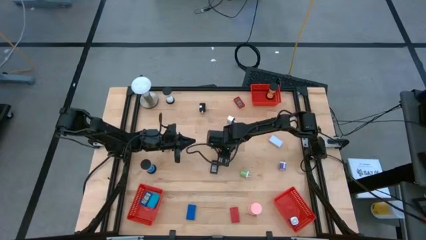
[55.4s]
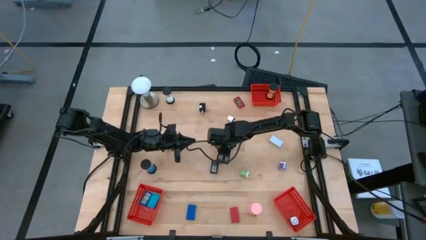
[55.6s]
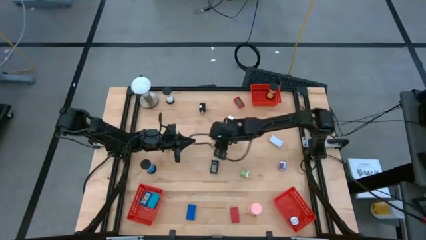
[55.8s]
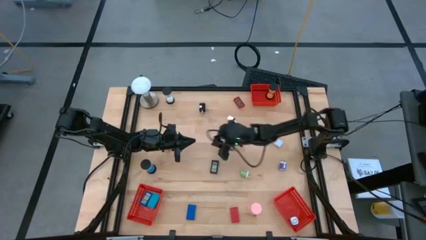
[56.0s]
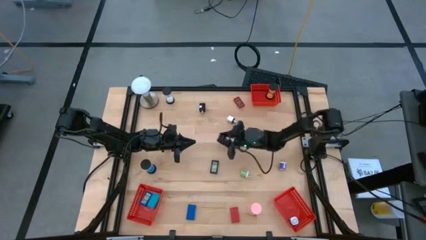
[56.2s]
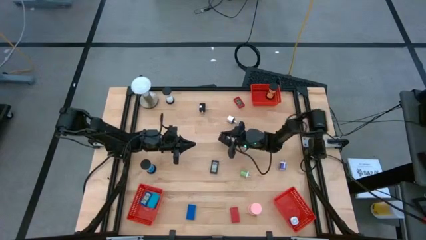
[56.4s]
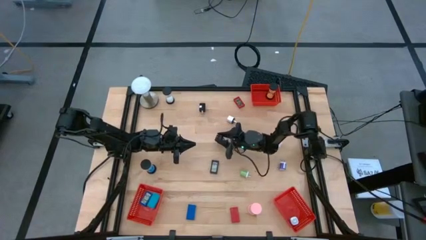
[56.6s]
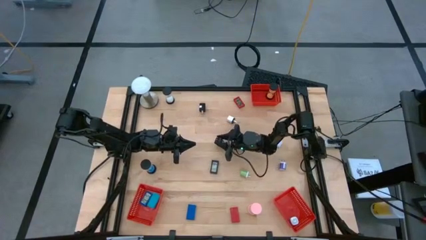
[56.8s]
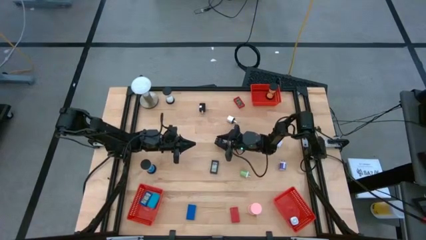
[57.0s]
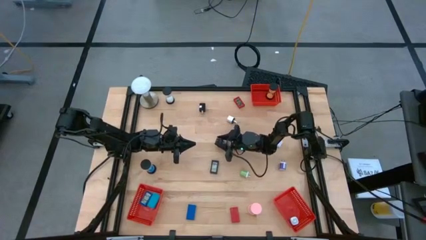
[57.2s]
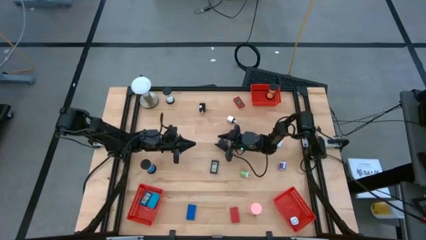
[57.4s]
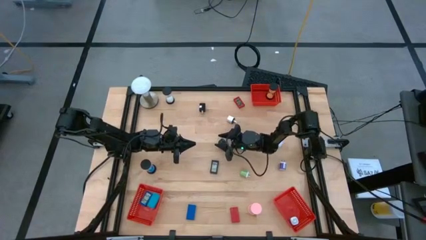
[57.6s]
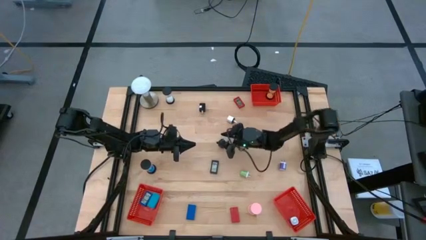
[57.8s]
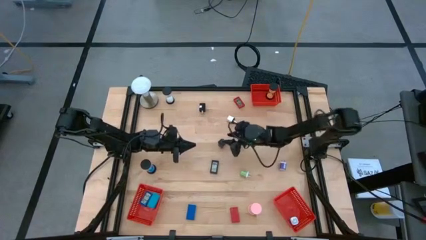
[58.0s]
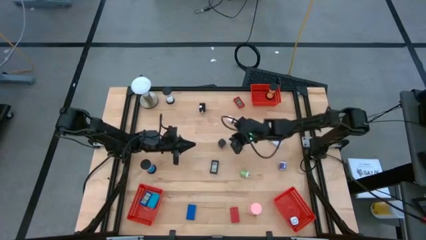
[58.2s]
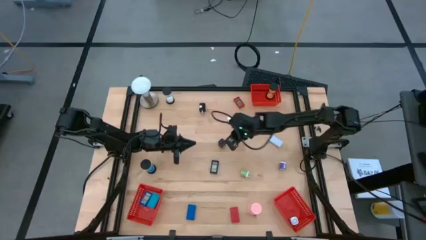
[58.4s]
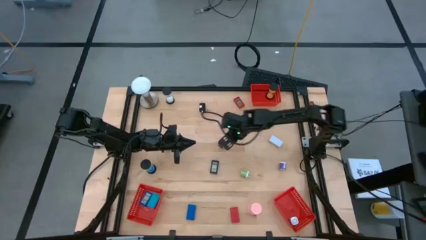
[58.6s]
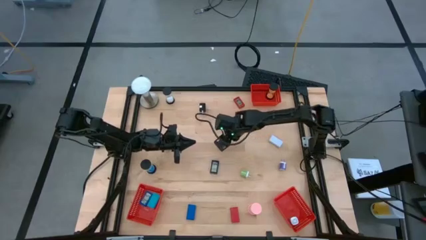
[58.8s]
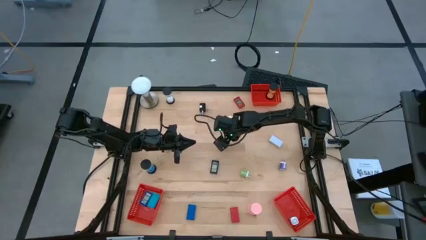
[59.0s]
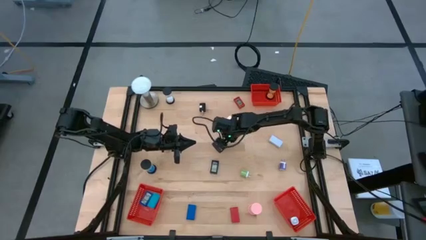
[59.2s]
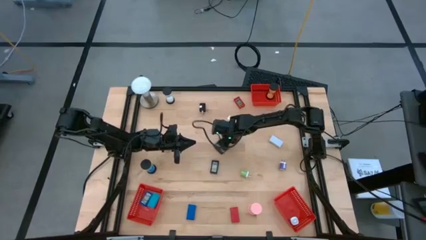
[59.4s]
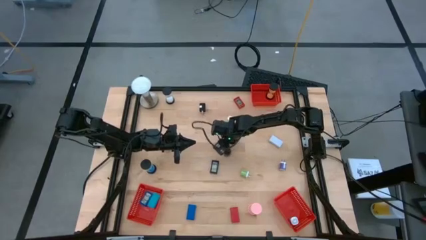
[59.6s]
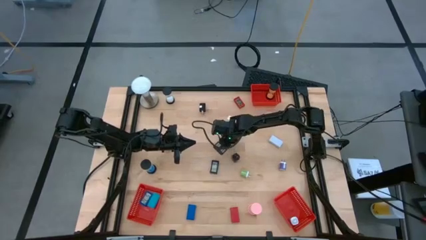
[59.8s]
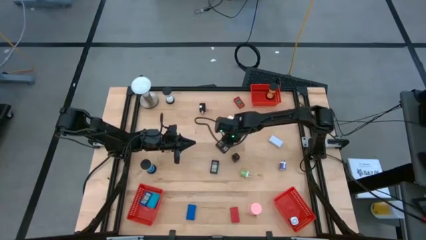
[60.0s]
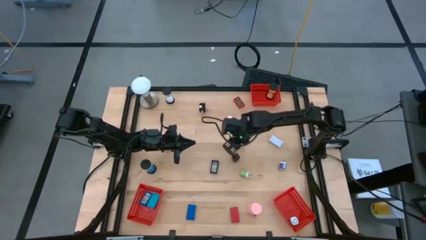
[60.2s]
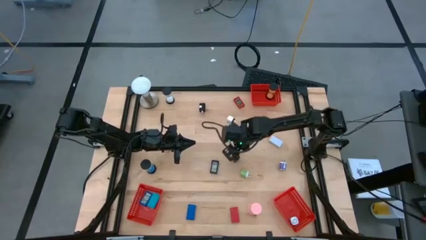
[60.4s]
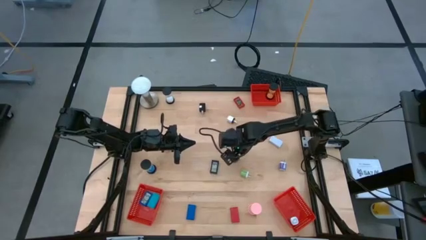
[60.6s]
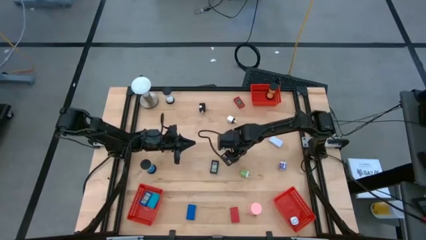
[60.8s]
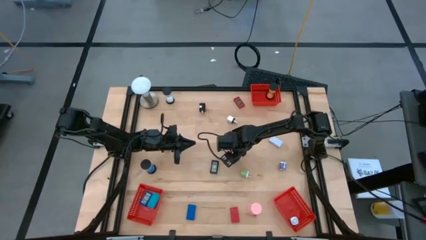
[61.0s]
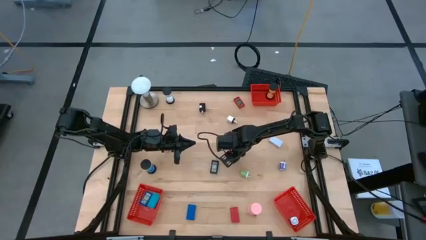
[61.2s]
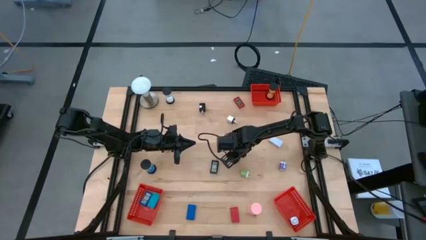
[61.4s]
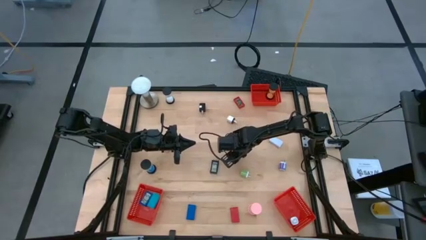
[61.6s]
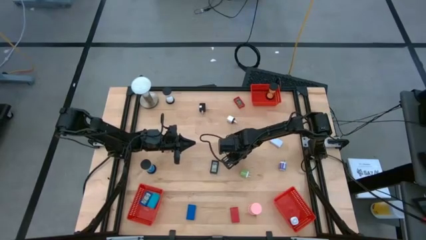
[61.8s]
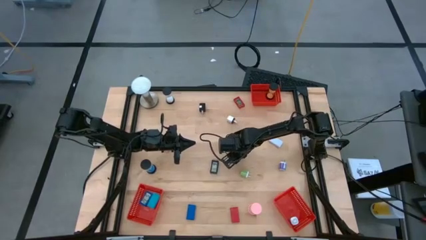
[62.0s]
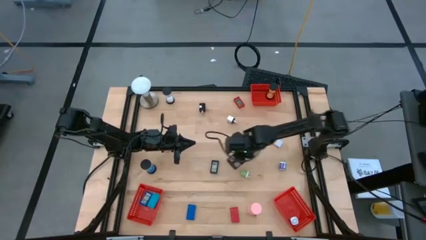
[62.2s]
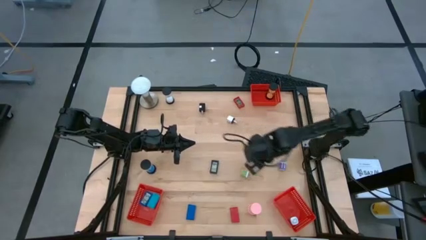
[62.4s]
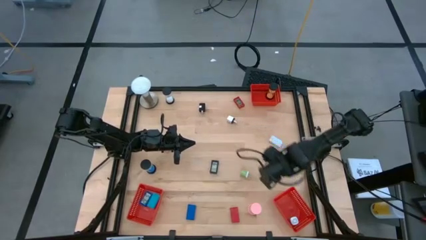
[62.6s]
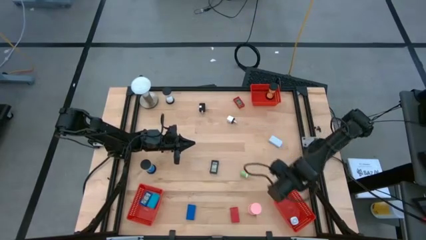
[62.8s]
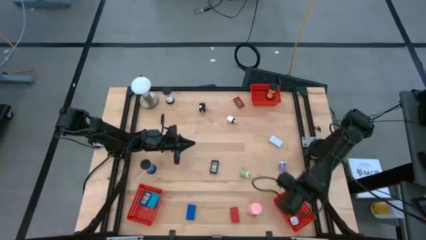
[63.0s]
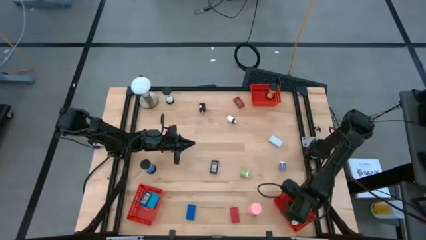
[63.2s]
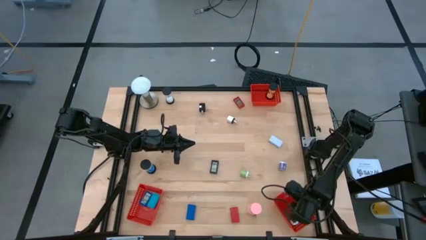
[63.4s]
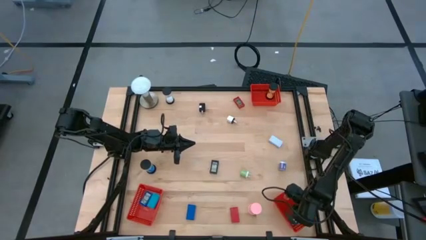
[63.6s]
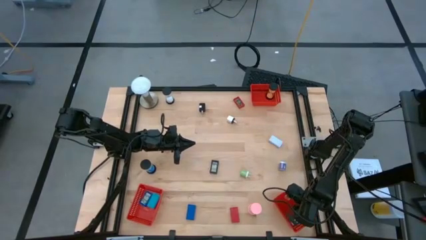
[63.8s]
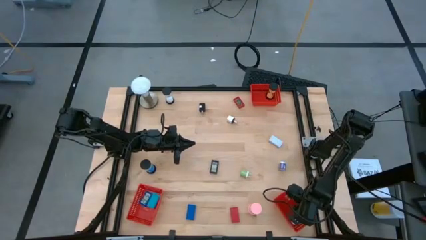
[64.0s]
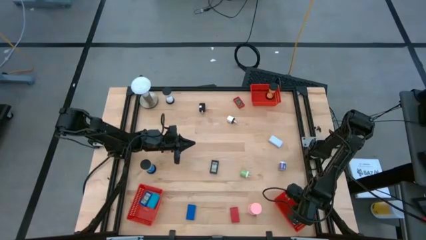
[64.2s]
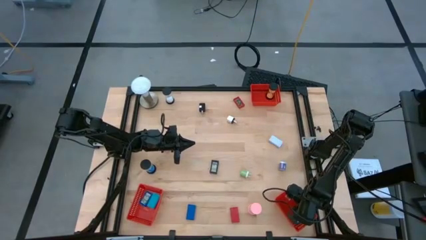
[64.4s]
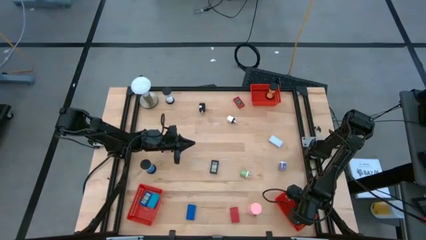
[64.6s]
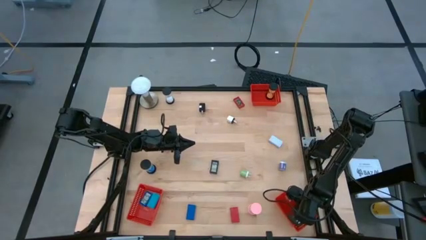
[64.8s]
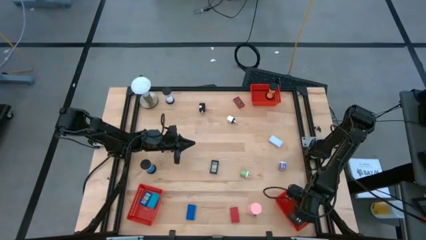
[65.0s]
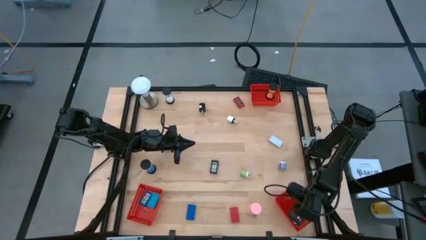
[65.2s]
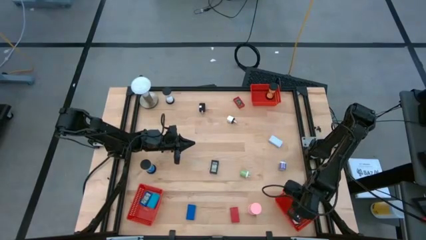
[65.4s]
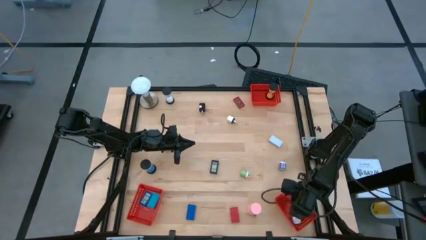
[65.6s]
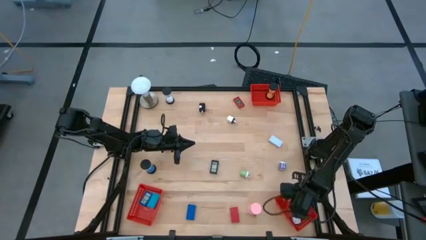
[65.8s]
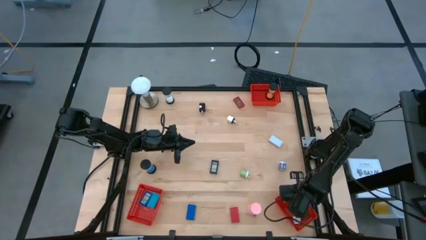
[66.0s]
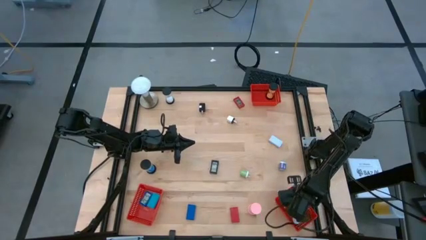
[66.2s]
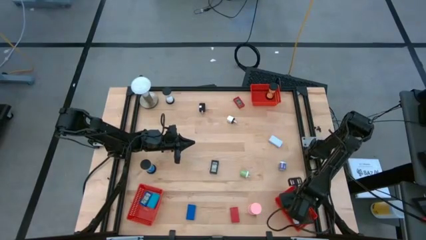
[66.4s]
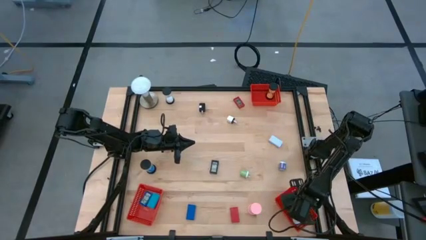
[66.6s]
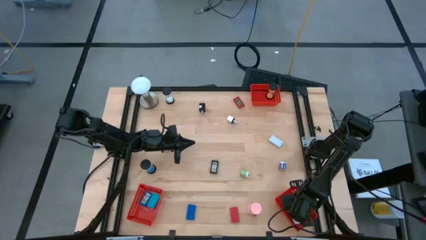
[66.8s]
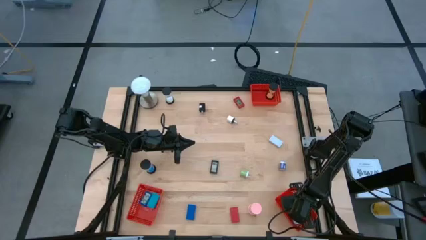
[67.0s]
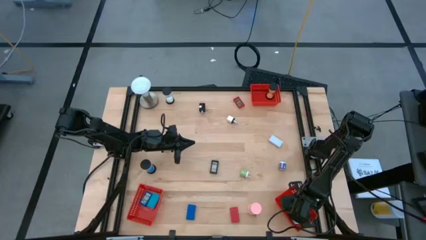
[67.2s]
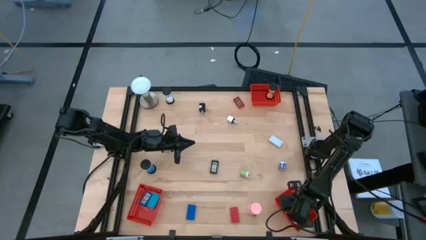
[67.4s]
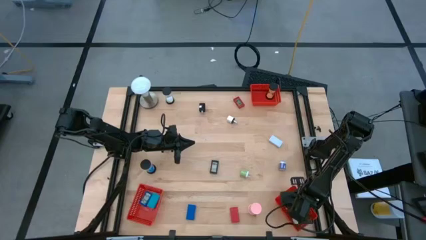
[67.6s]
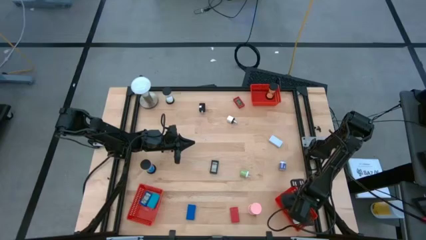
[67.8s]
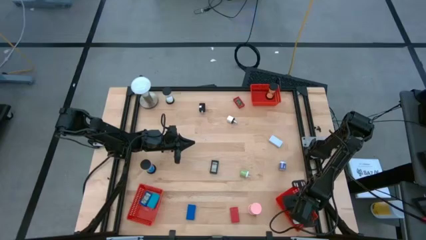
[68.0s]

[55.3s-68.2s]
Task: Pick & Place Office items
Put the bottom black charger adapter into the bottom right red basket

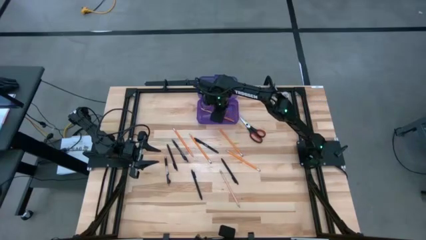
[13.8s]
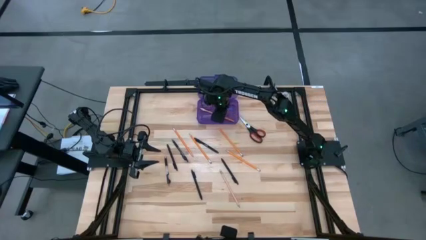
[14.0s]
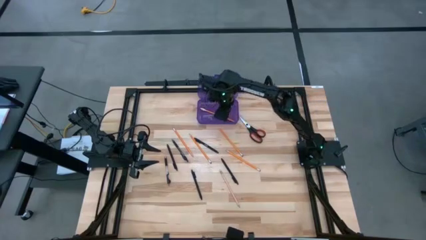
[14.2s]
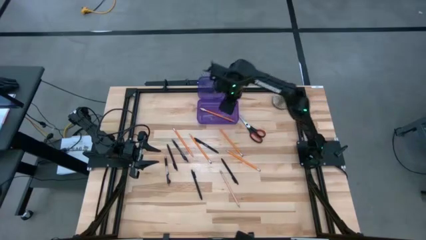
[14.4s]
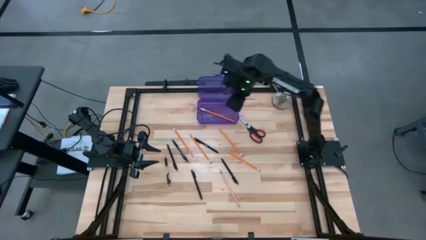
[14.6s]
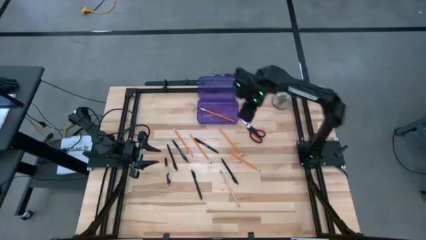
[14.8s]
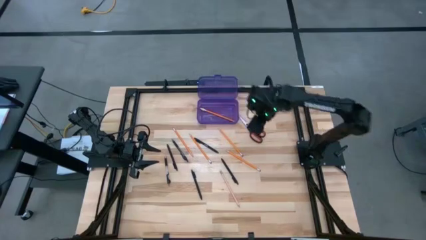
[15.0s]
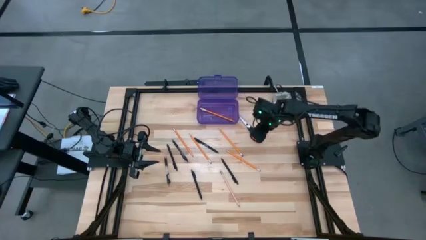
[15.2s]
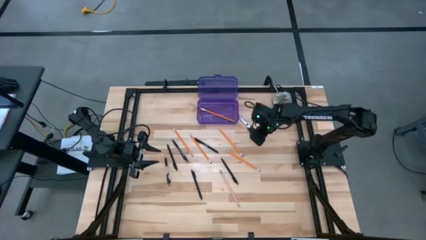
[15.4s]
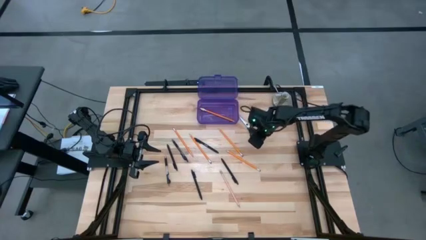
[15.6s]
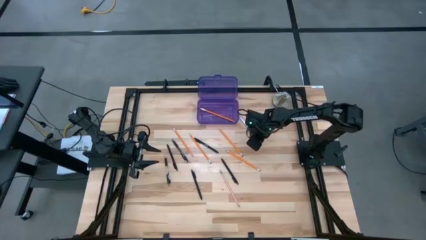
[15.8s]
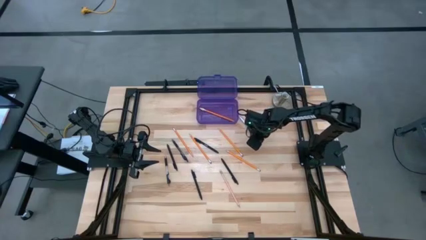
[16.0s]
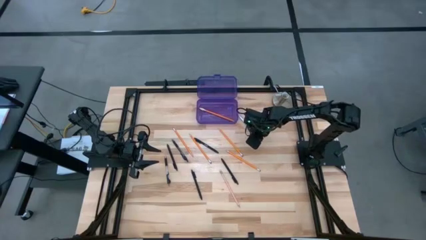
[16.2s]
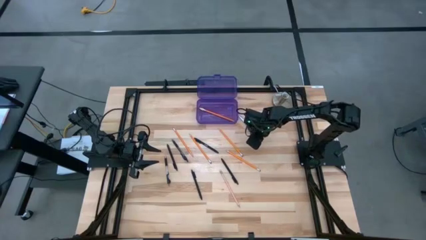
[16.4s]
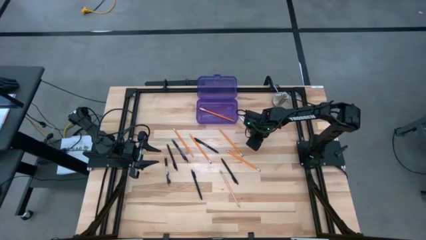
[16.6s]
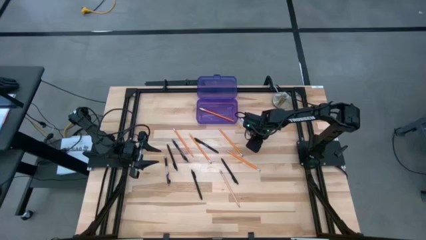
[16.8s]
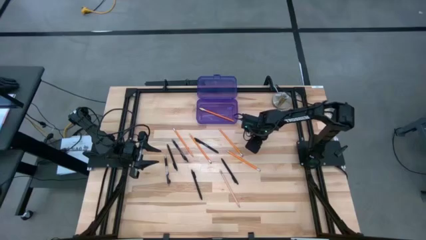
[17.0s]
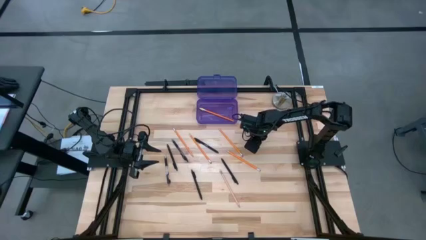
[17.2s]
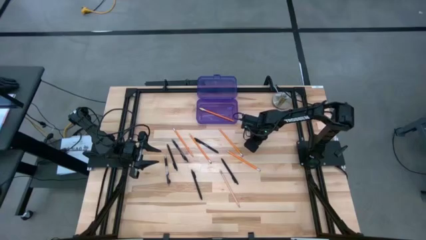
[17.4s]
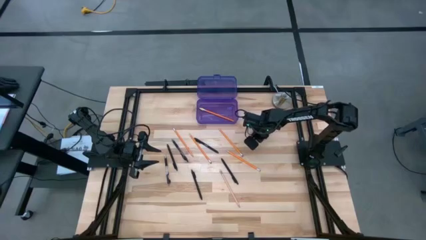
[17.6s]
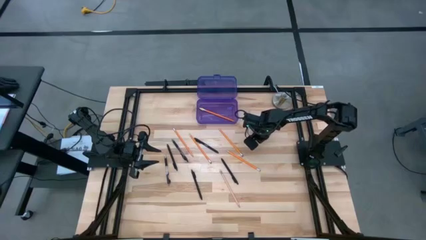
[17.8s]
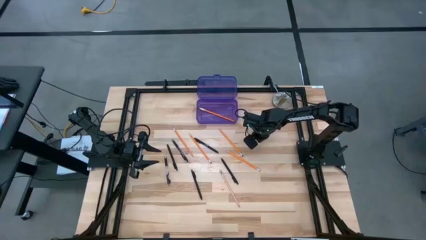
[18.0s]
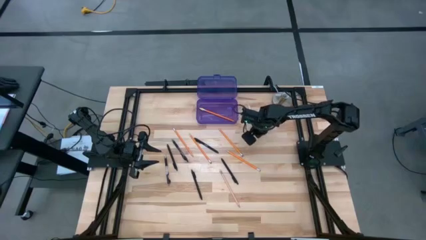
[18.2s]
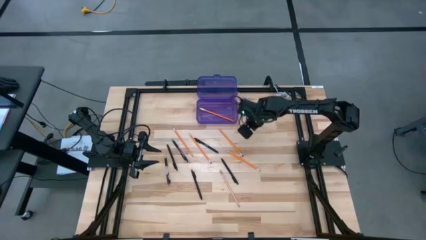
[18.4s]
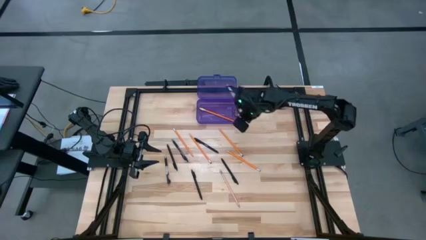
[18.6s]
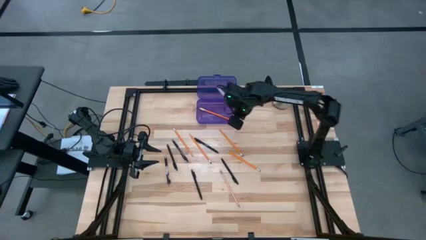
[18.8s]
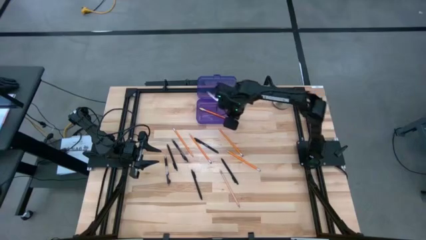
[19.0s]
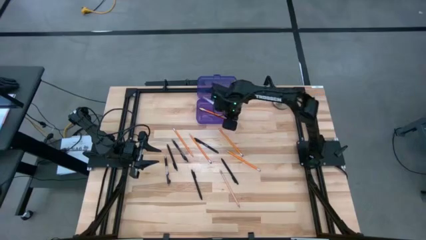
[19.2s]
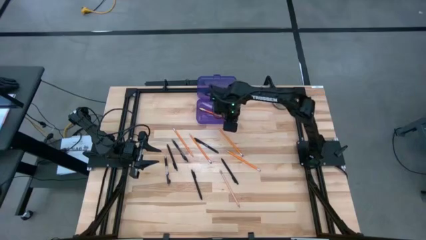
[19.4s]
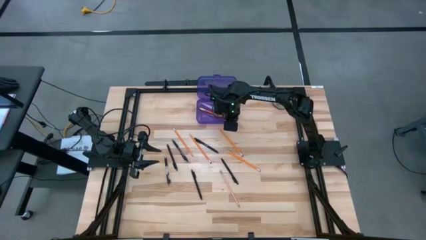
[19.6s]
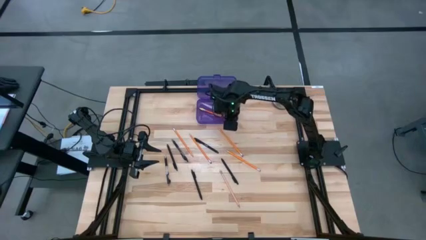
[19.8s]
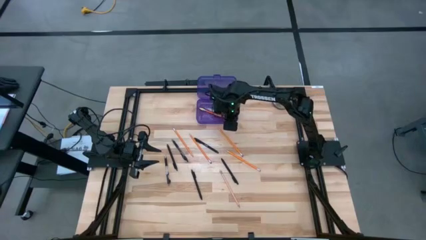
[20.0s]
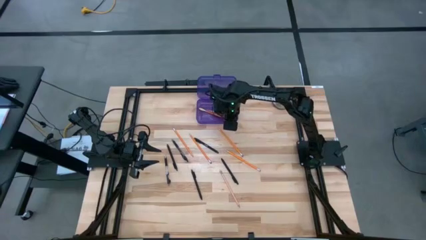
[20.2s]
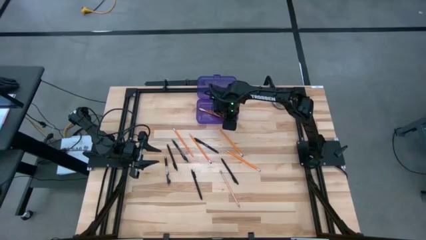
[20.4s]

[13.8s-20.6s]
Task: Pick & place school supplies into a supply box
Put the black scissors into the violet supply box
